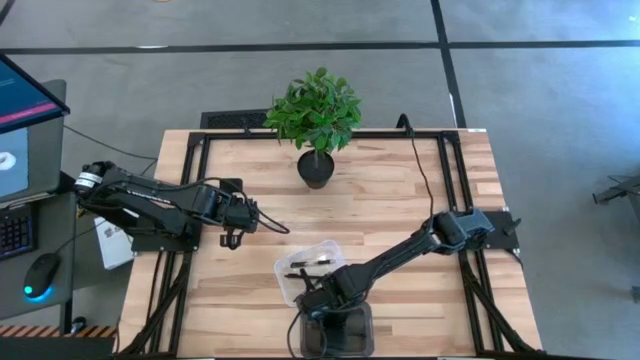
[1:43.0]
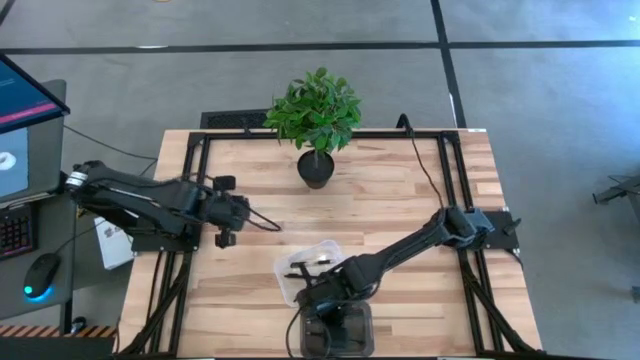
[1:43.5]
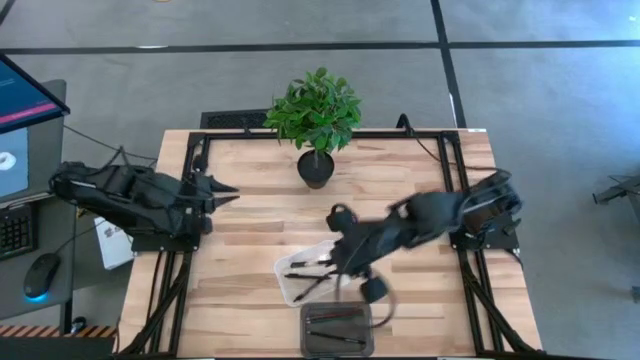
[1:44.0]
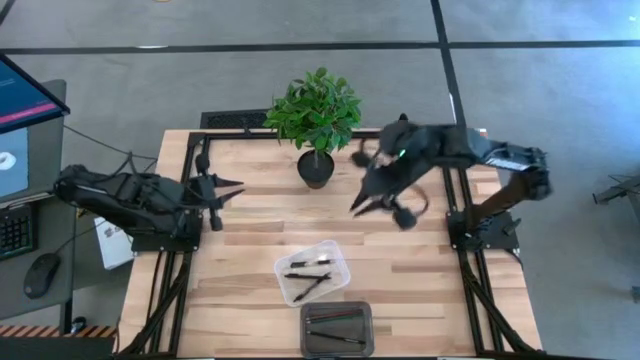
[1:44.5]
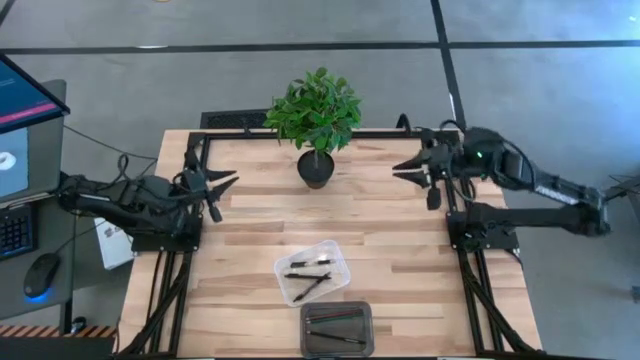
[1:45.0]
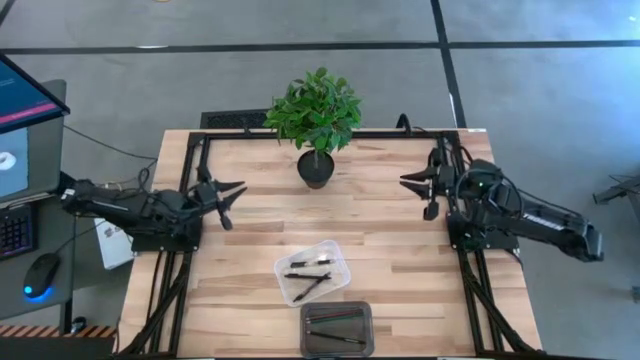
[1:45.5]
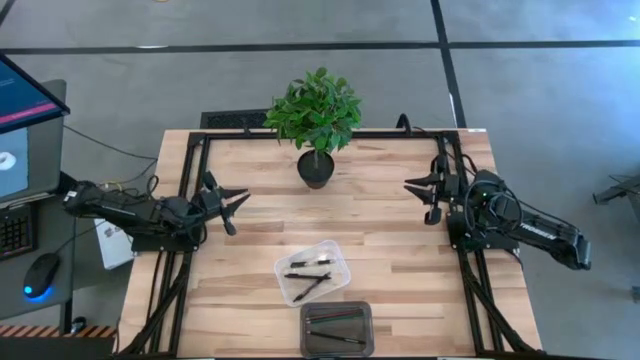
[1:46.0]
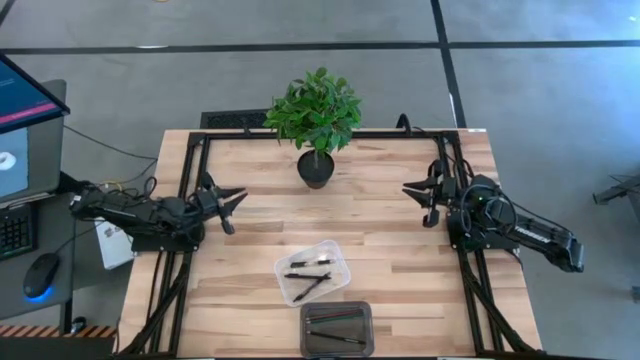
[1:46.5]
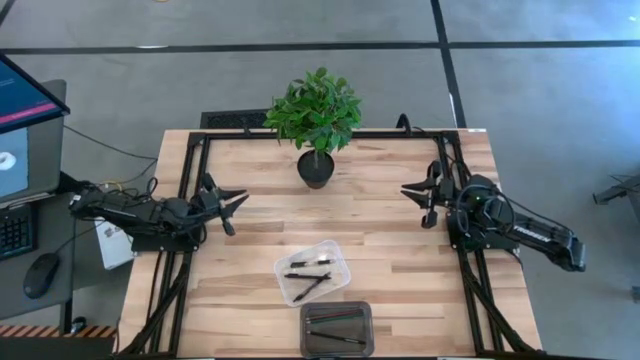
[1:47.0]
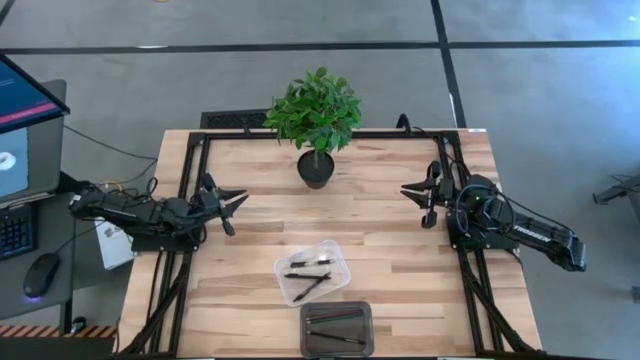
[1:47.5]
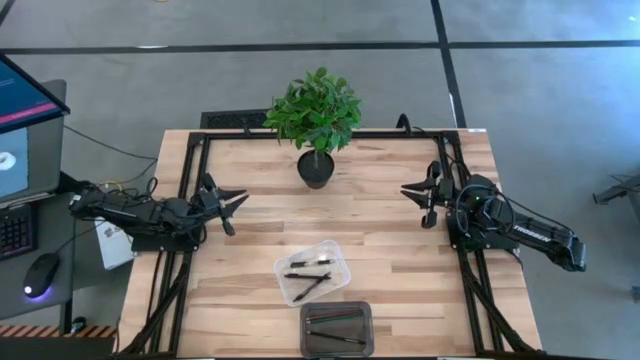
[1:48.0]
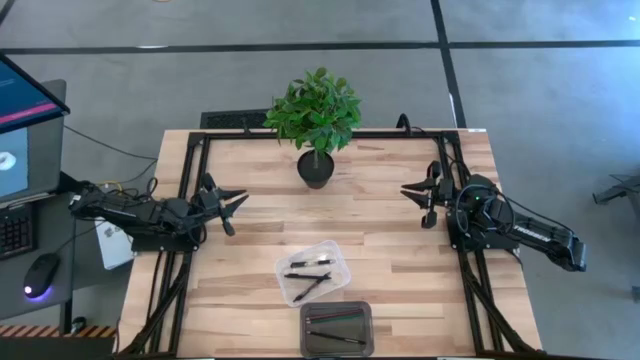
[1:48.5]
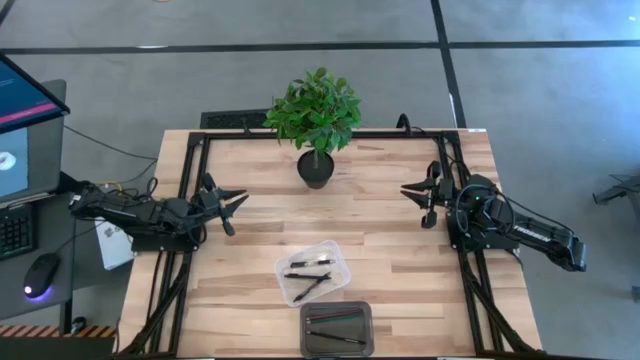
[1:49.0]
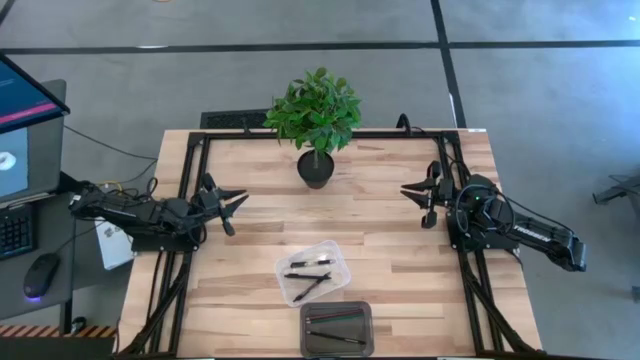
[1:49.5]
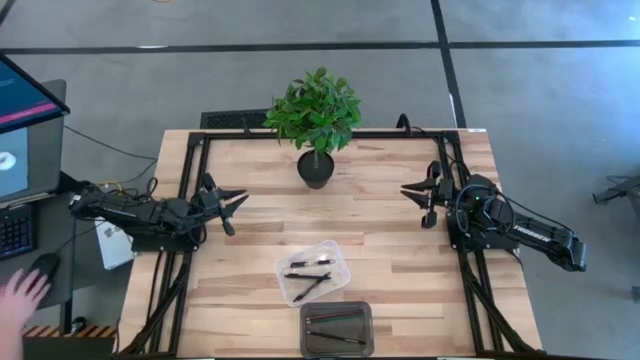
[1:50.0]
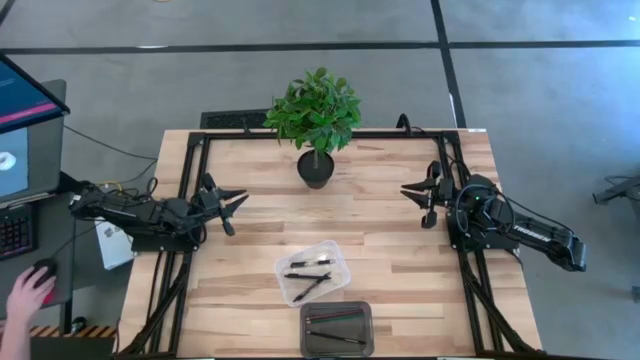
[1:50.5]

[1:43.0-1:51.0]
Task: Sort pens & pencils
Return to Home Position
